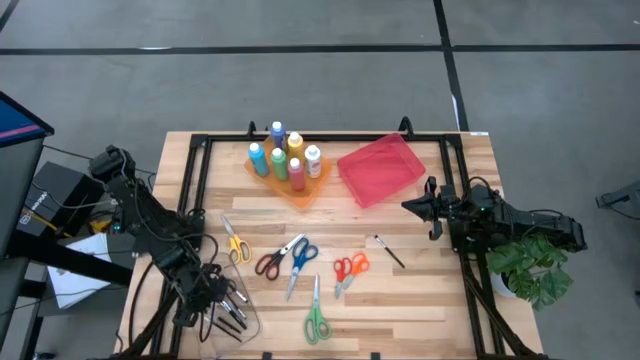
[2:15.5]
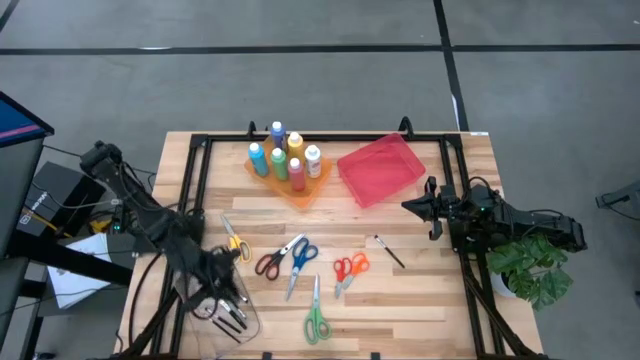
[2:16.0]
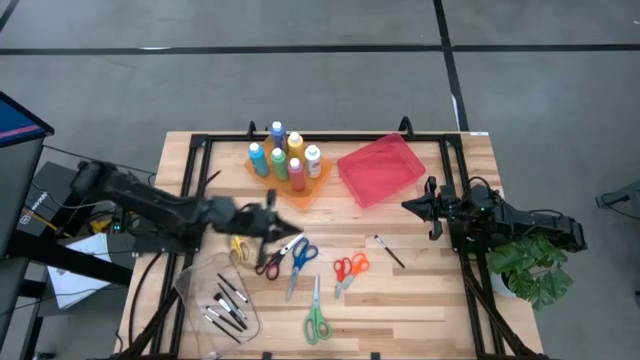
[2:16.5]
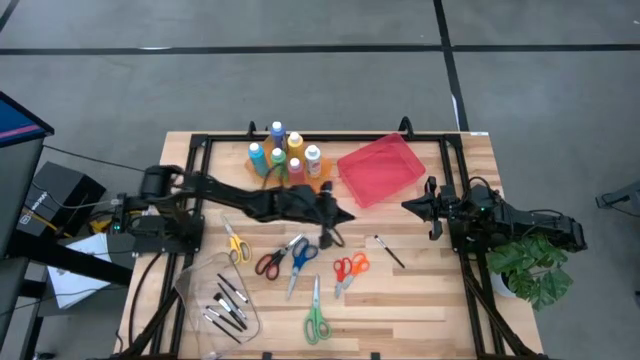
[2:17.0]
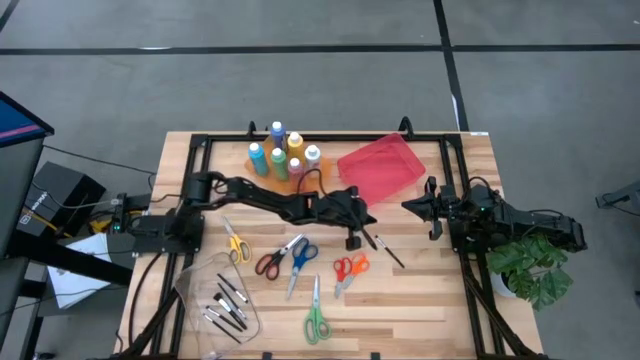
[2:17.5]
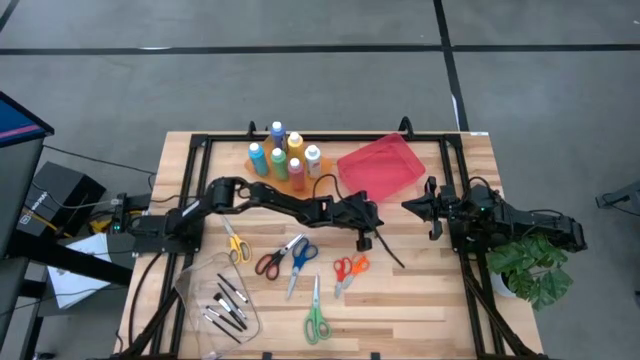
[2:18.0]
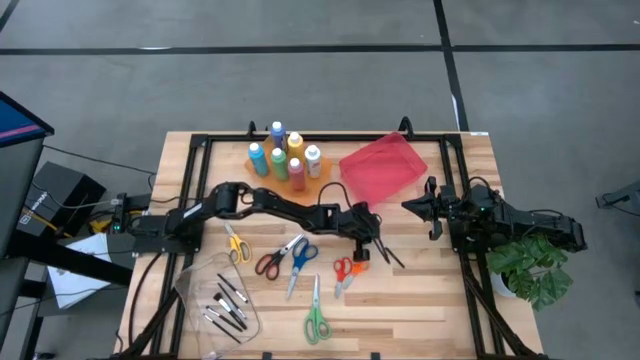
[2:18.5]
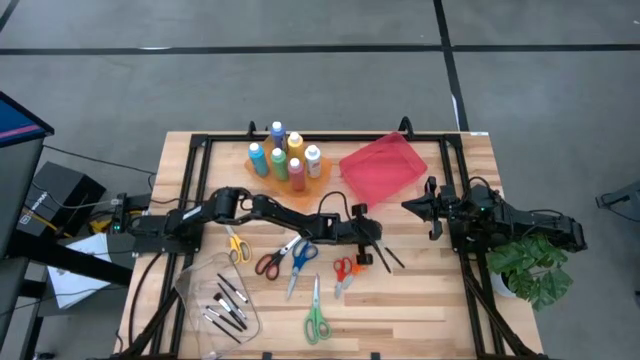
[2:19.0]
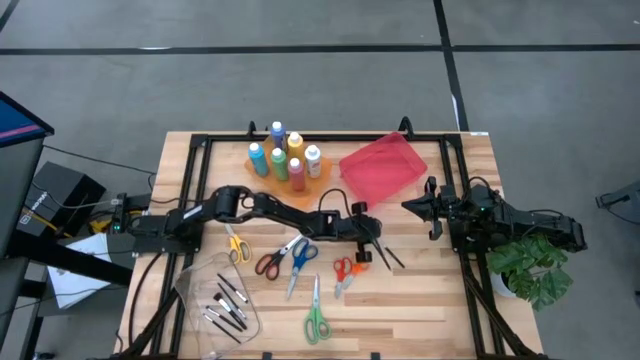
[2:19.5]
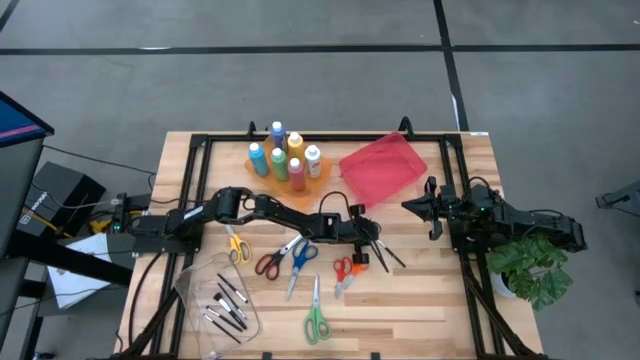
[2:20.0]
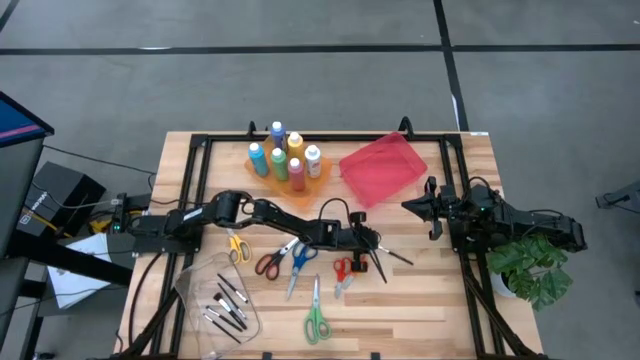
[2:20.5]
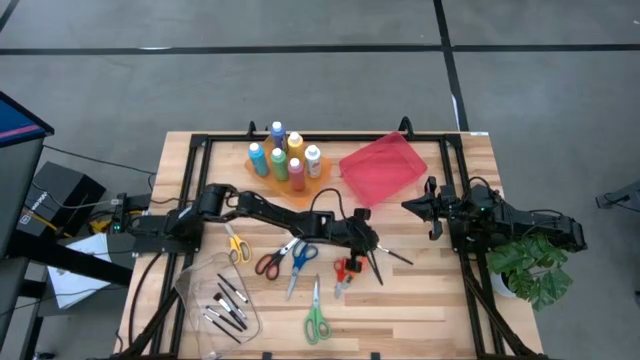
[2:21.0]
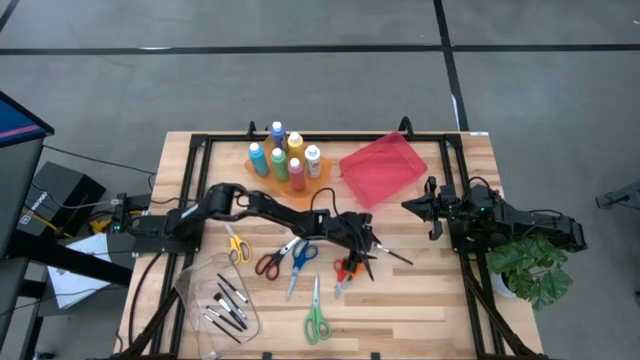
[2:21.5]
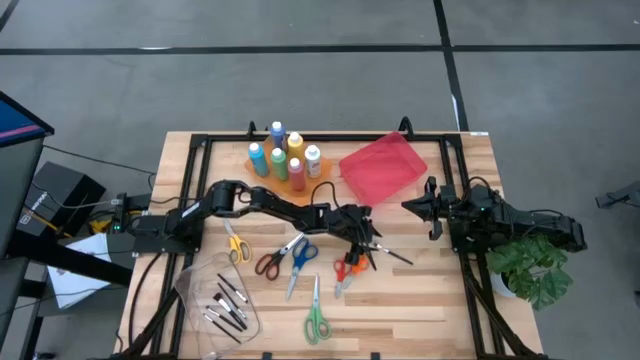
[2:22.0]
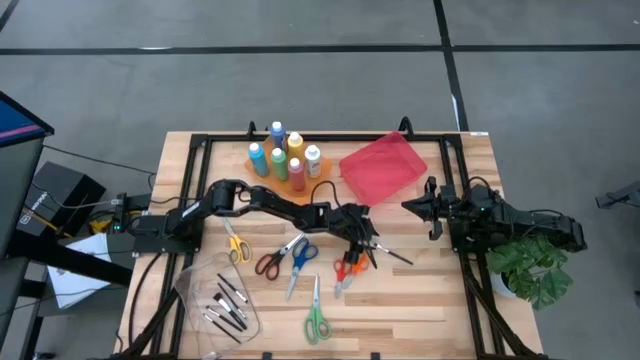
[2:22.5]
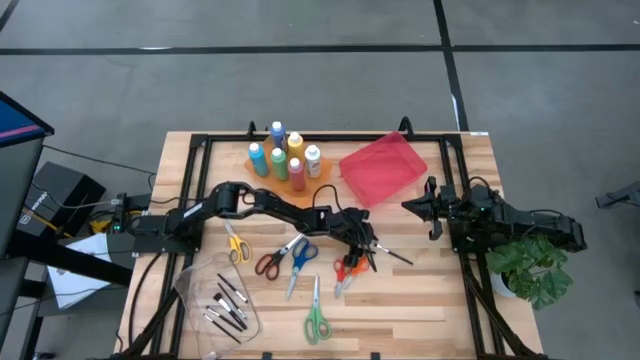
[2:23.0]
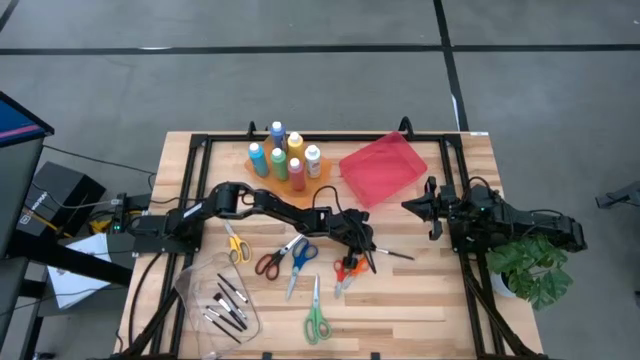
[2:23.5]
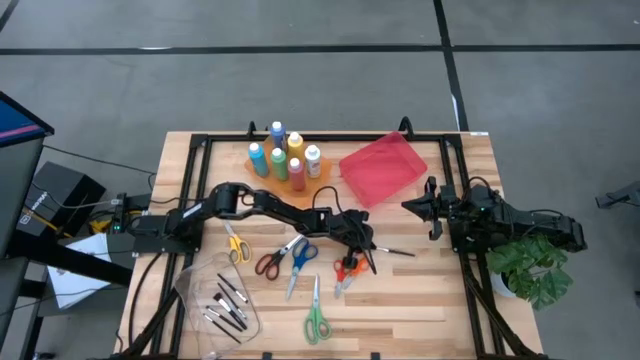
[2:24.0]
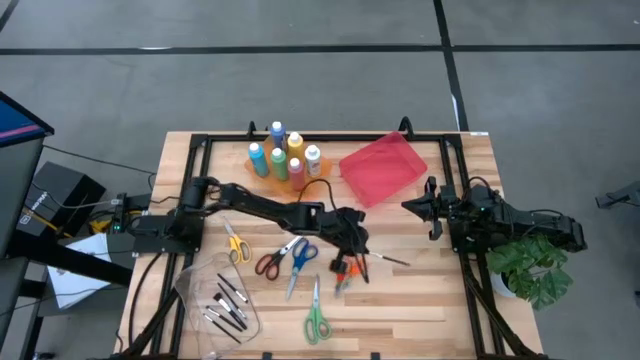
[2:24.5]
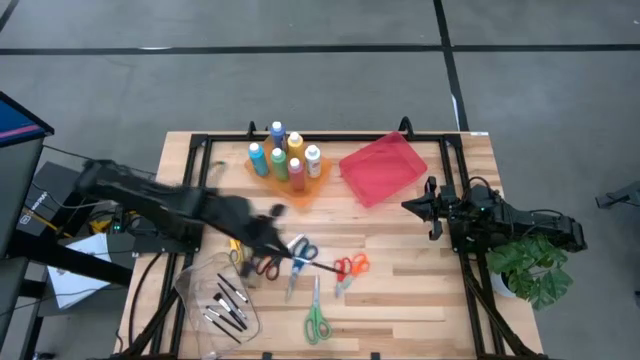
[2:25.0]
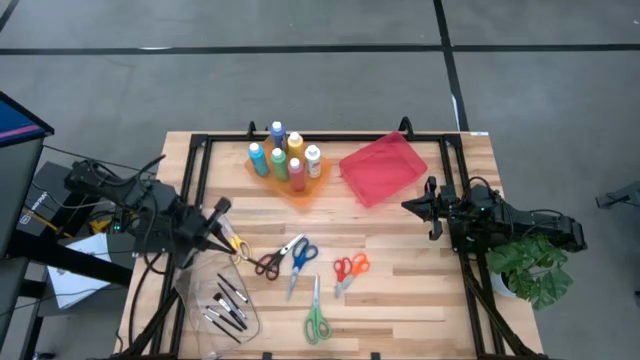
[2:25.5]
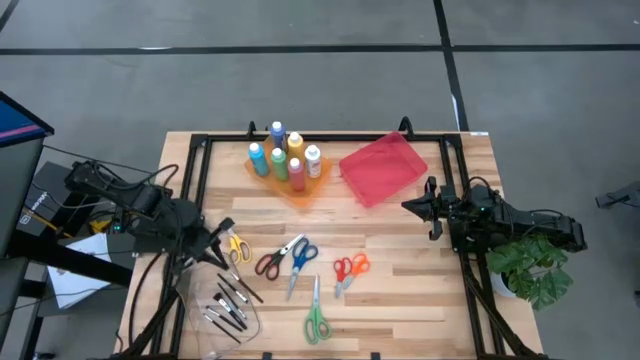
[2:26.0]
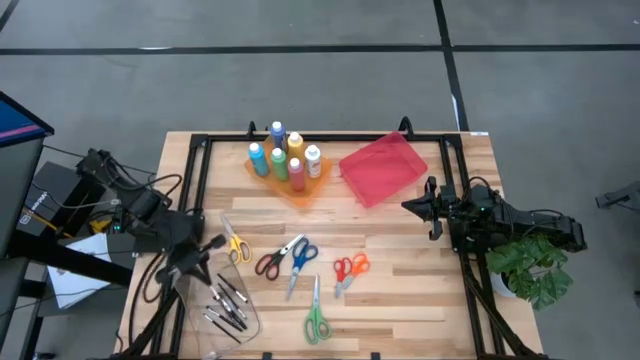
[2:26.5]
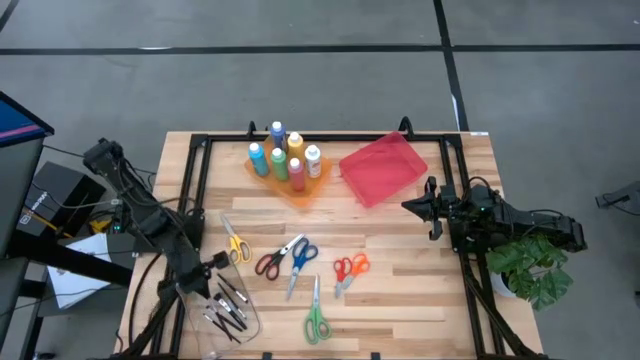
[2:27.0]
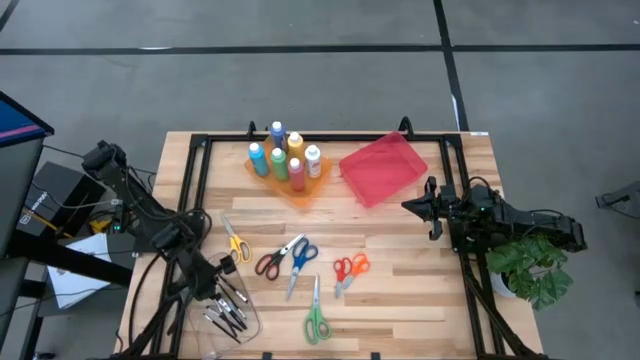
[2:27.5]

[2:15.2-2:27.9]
Task: Pick & Place Paint Supplies
Put the makeup brush into the transparent bin

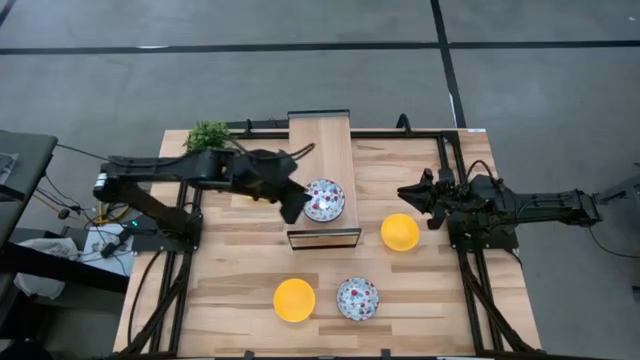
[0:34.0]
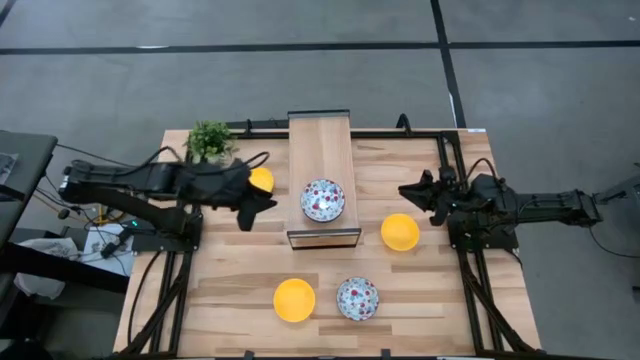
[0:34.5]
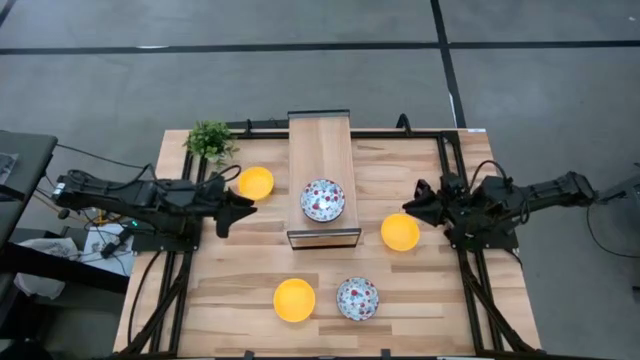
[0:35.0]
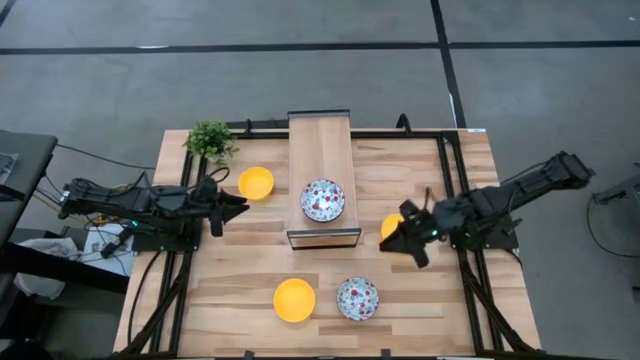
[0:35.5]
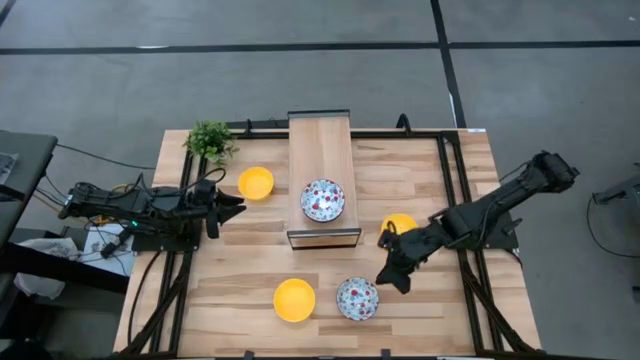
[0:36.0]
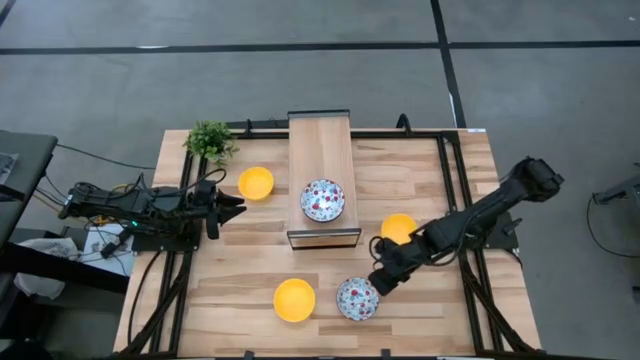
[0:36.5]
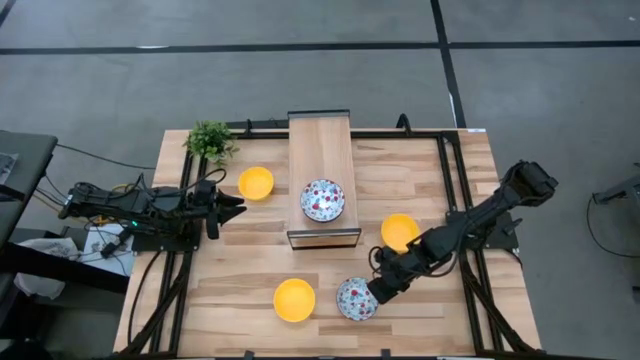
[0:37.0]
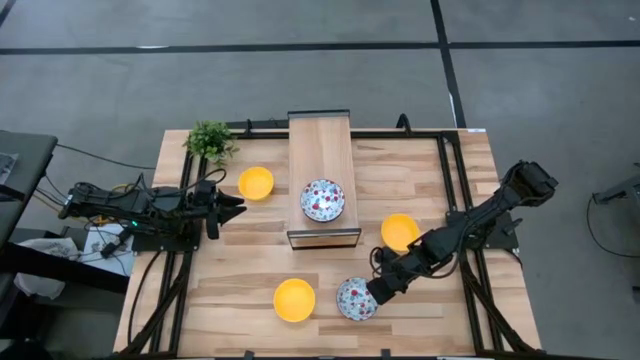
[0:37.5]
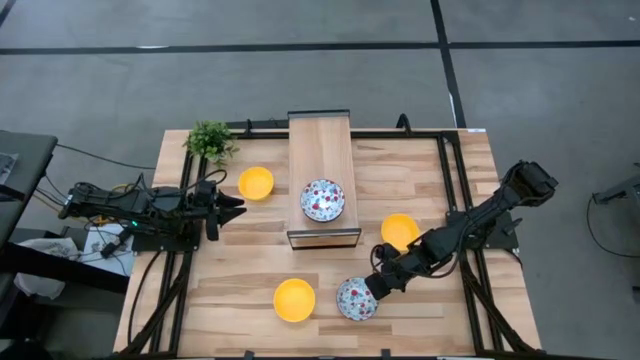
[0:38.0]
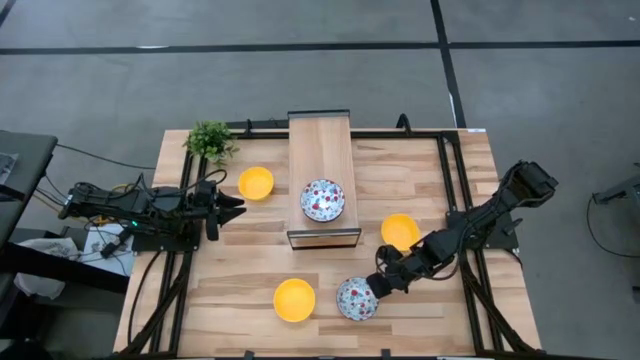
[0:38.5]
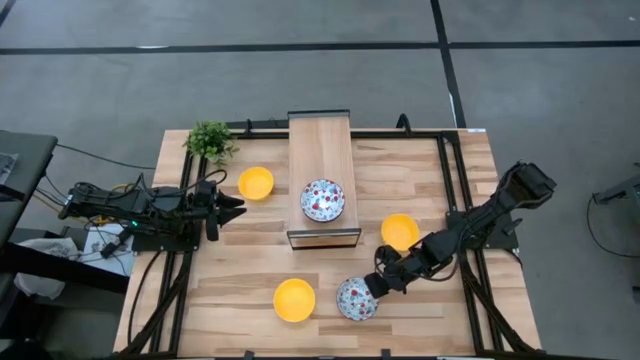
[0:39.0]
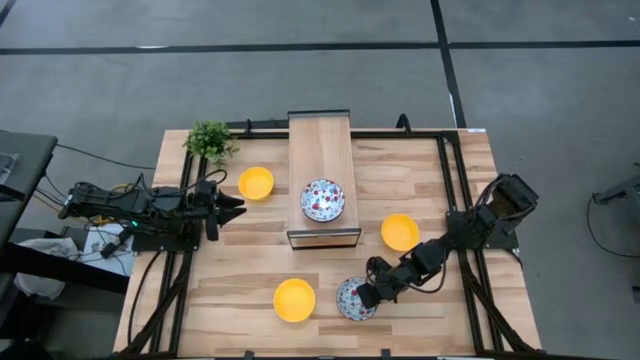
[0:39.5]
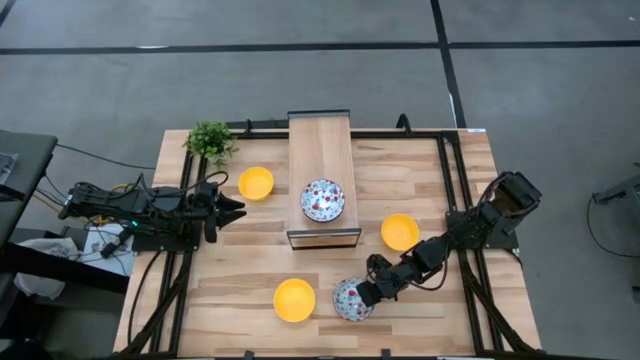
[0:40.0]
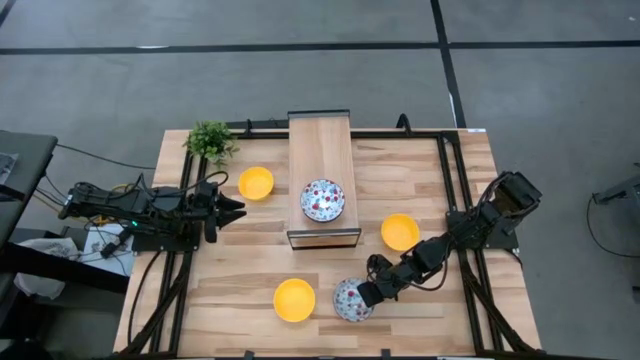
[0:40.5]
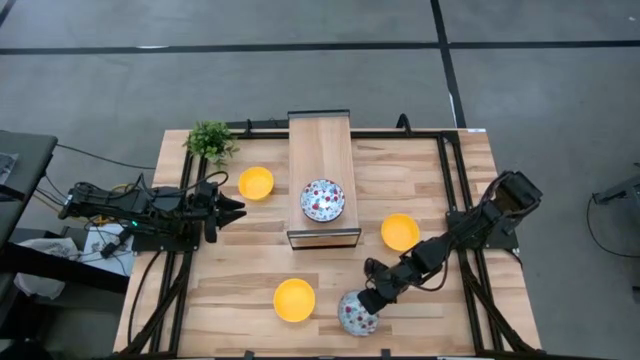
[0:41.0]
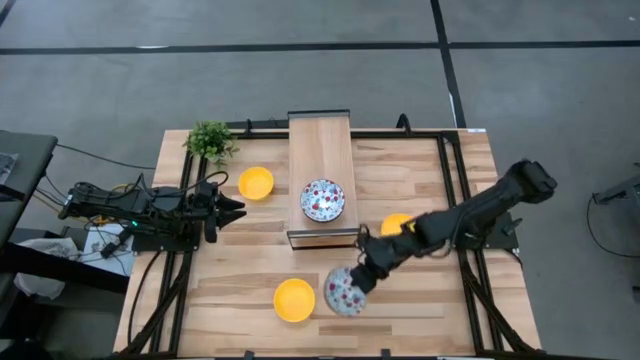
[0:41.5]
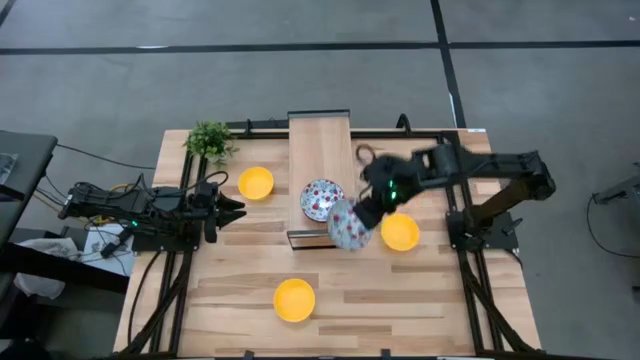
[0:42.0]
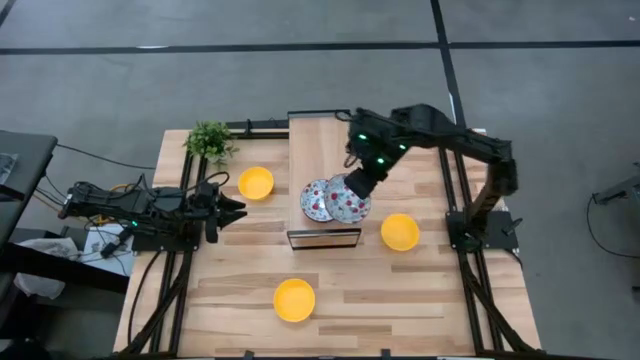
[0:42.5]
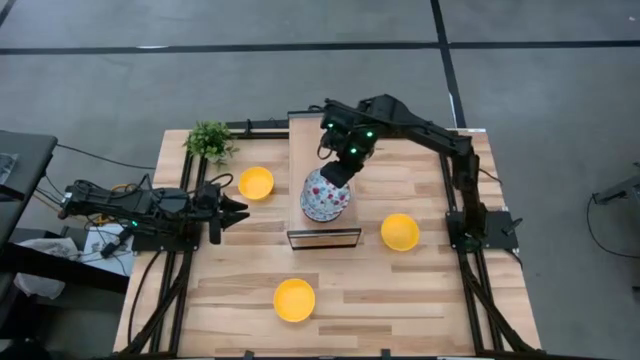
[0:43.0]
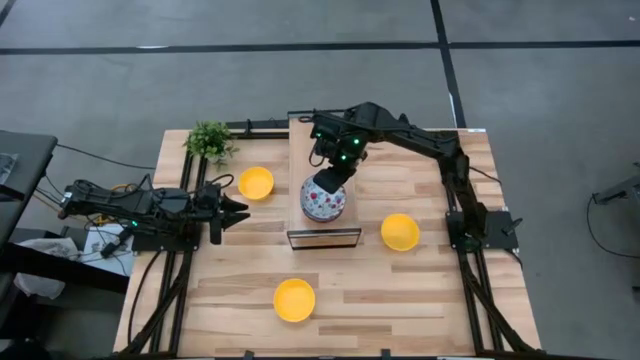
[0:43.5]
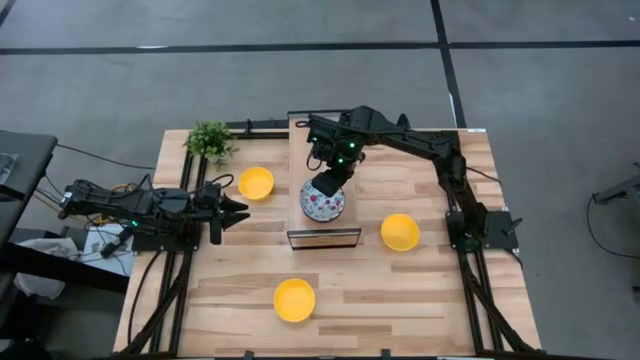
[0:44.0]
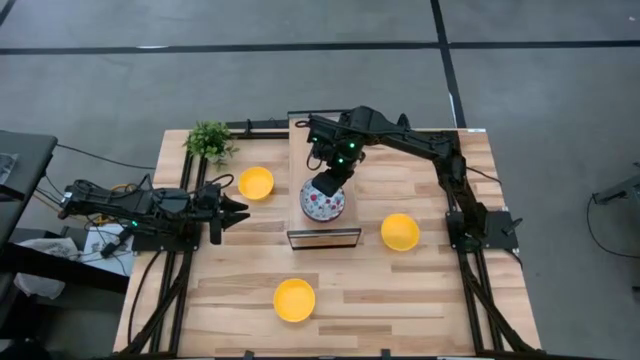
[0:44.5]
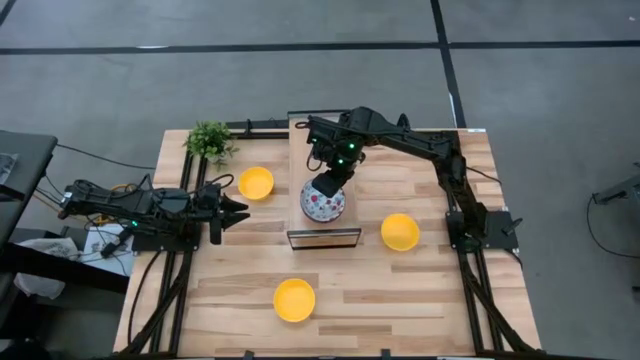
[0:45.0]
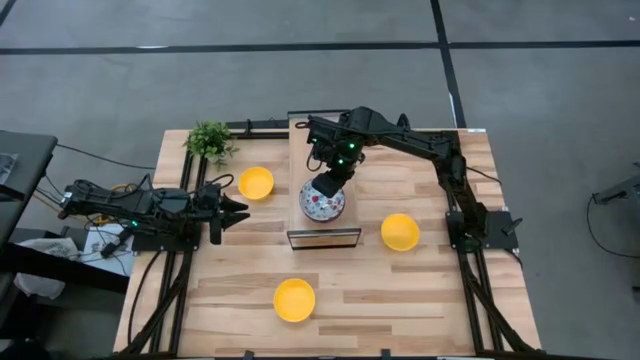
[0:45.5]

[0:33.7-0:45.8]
Task: Pick & Place Mini bowls
Stack the white patterned bowl on top of the white patterned bowl on the shelf
